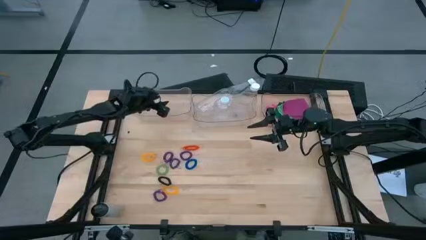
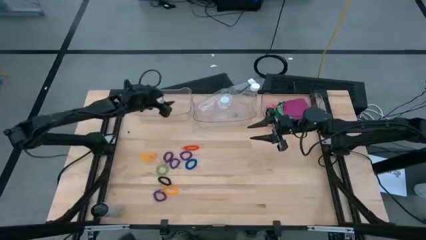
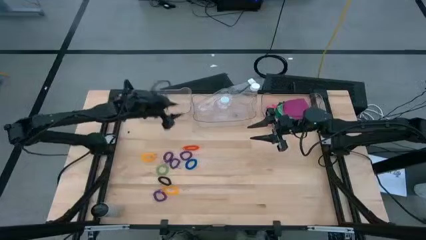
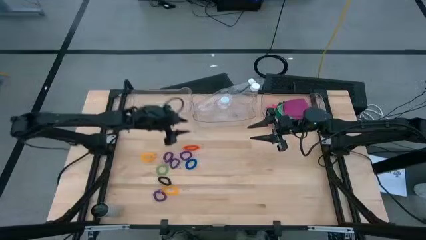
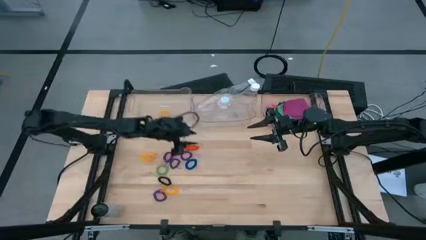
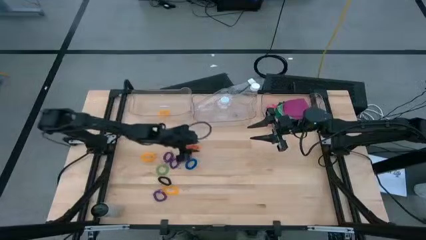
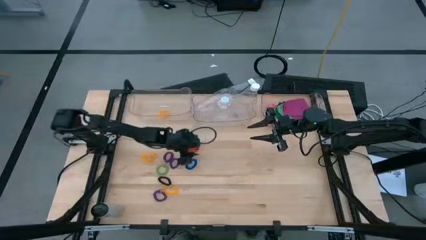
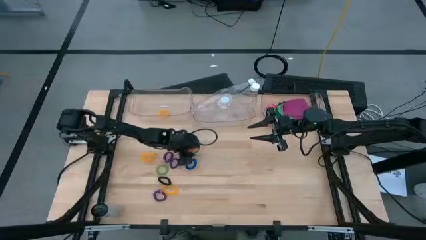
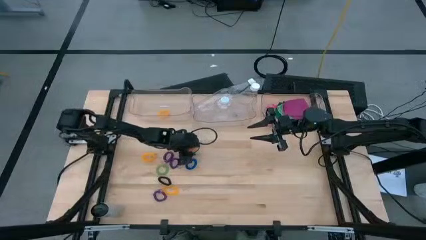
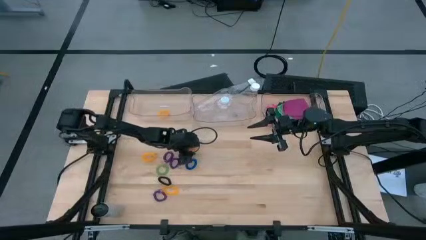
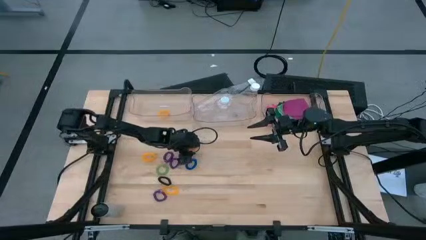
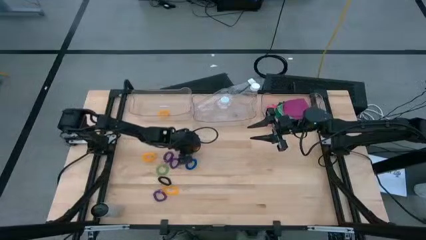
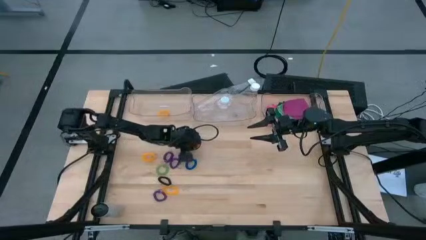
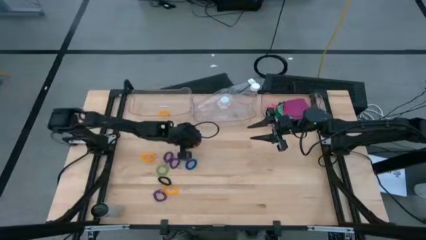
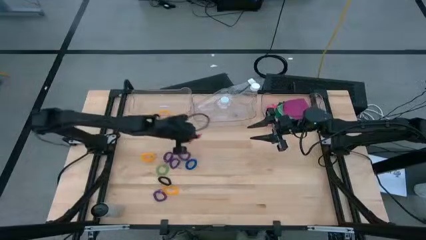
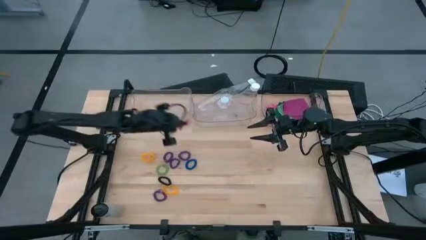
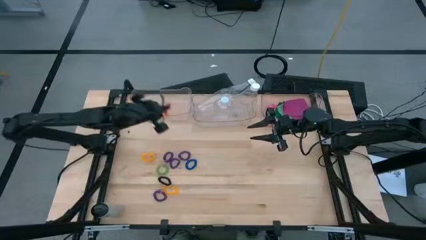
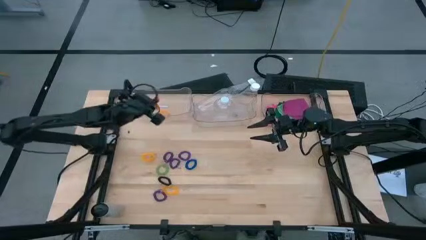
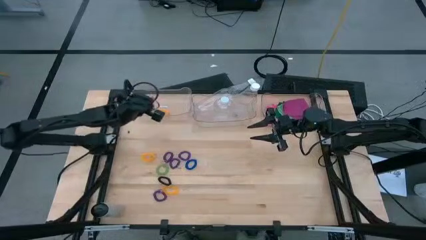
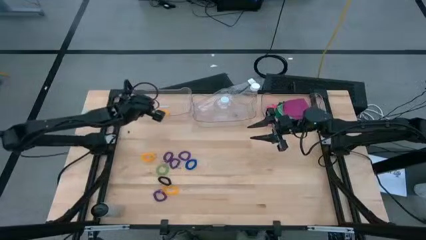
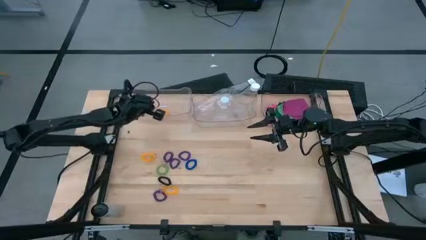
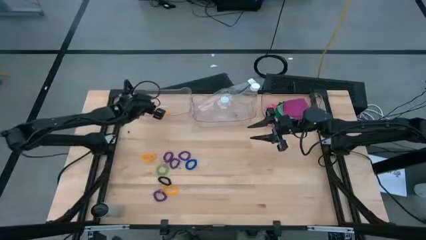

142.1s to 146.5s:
Task: Pick & Place Sports Items
Put the orange spring keychain into the left transparent bin

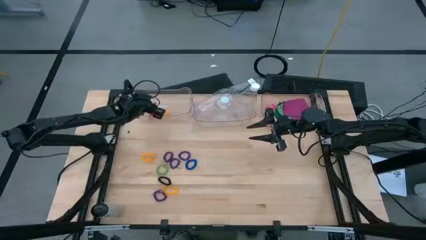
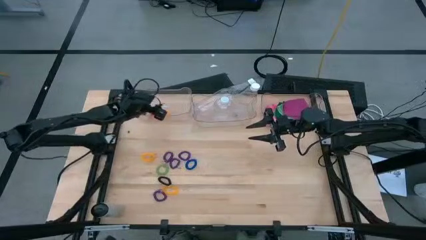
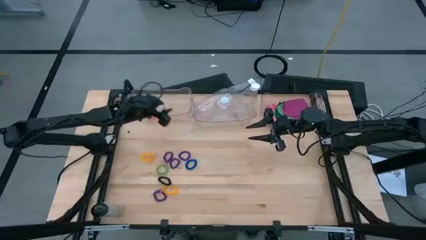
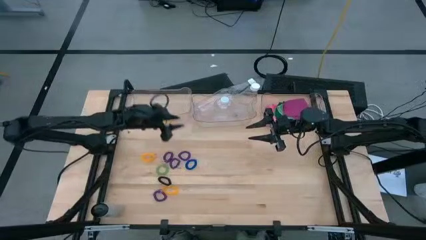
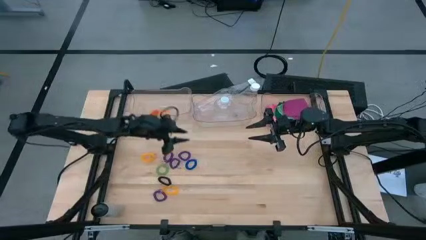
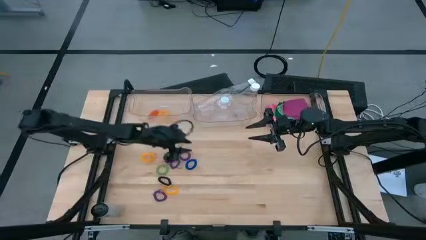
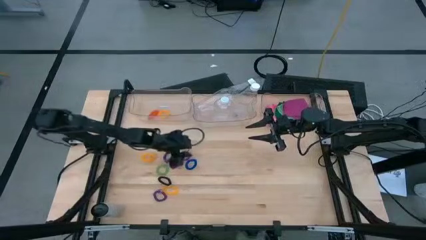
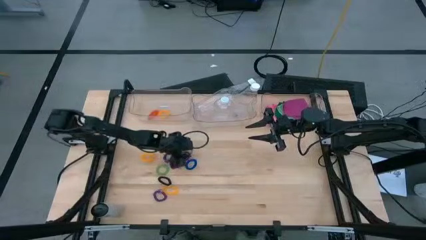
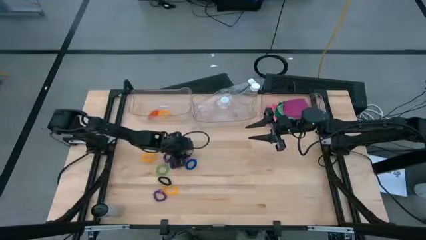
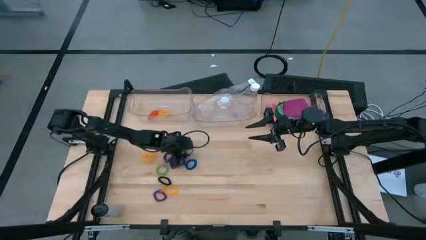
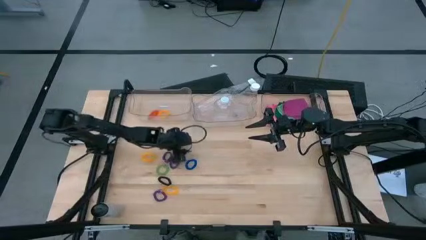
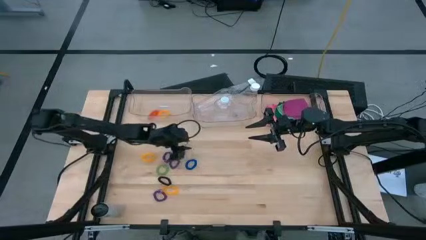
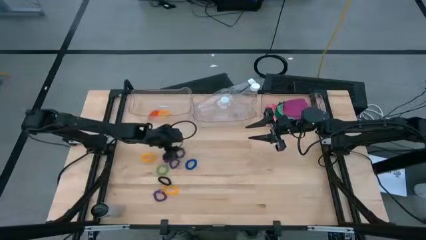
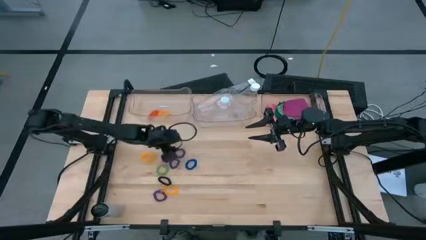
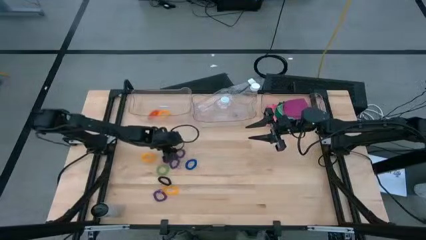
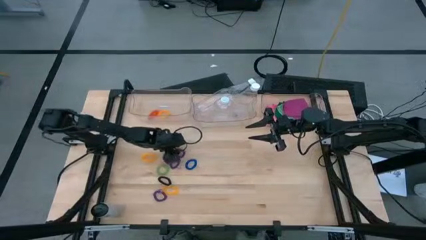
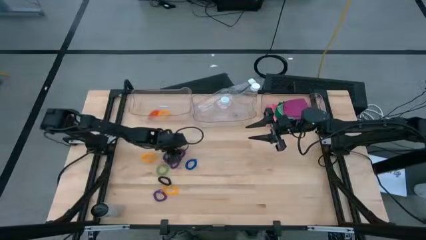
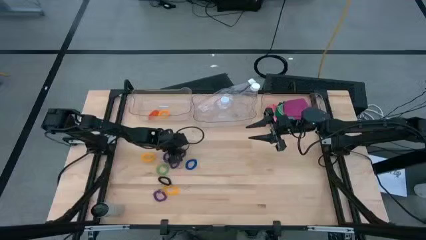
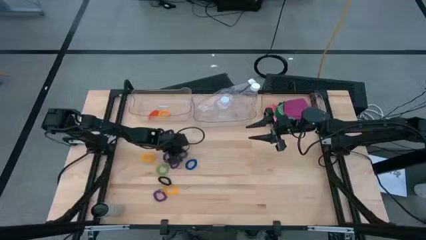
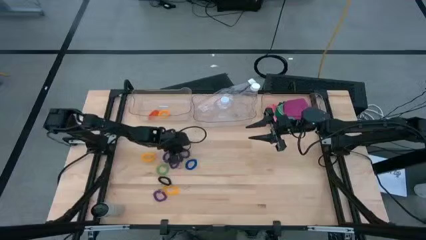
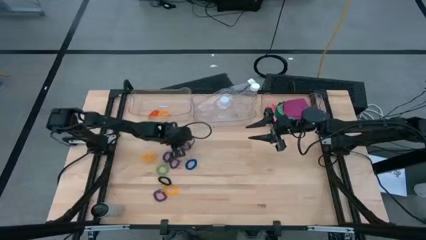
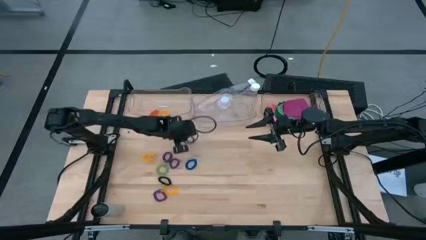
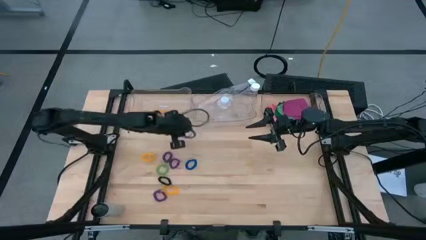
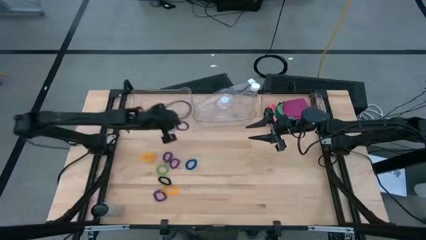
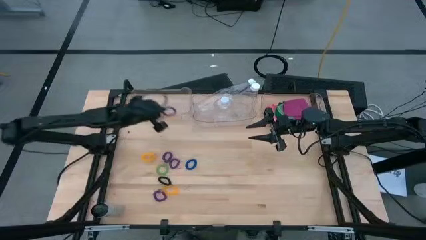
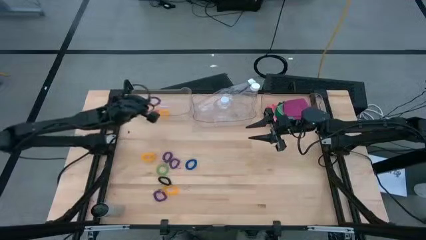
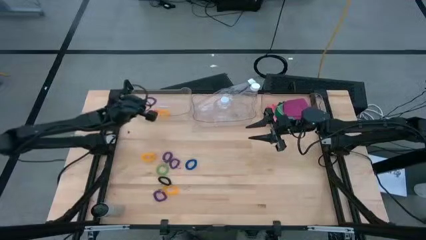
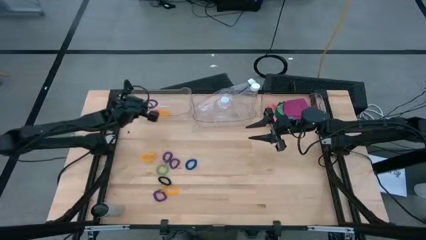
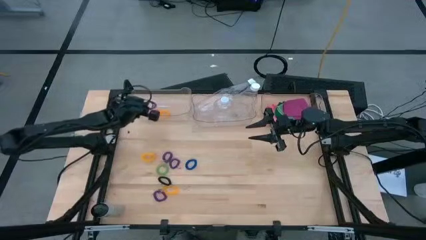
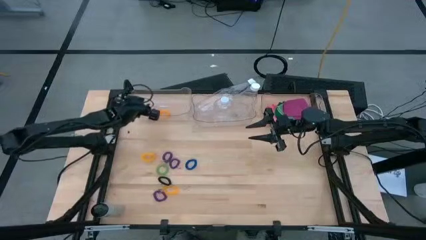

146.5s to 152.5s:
Put the top right violet spring keychain into the left transparent bin

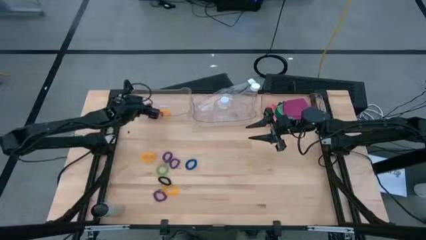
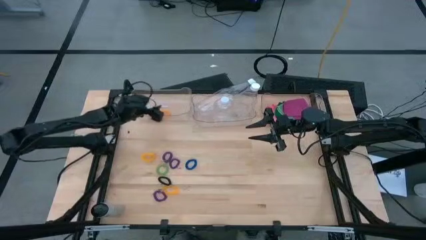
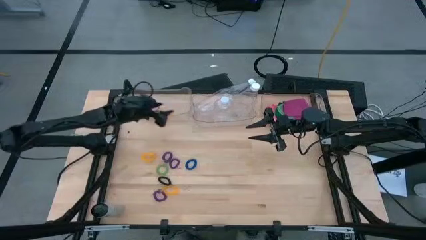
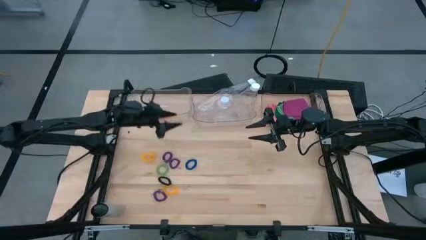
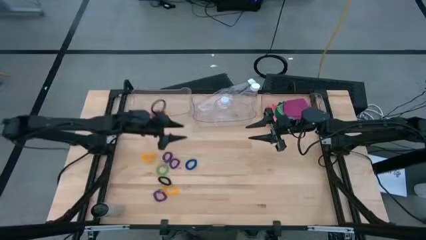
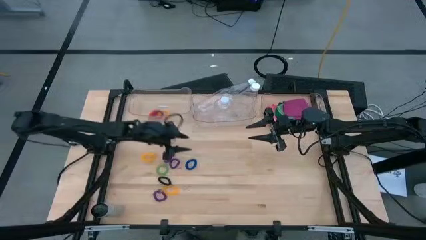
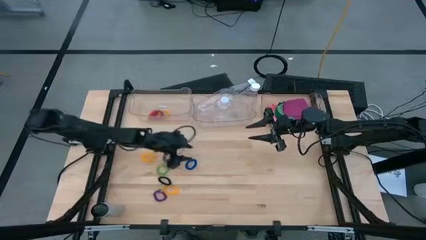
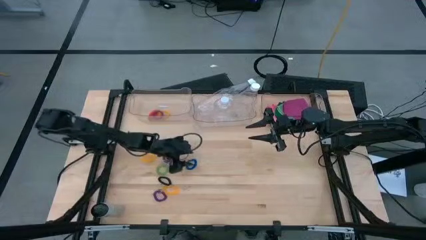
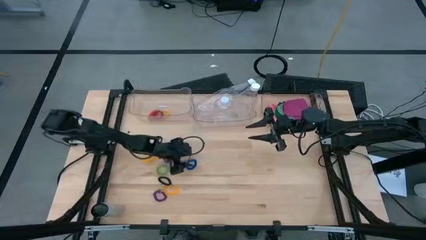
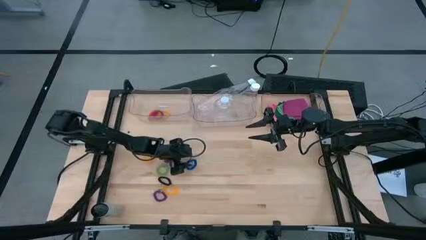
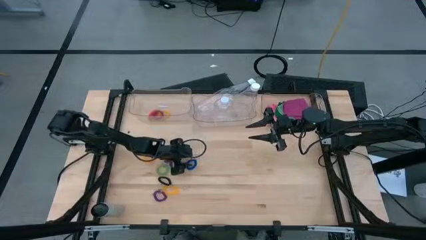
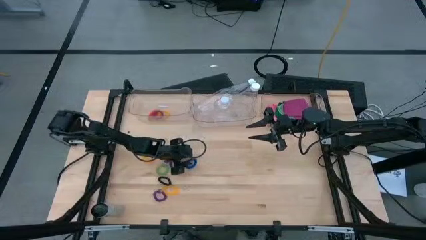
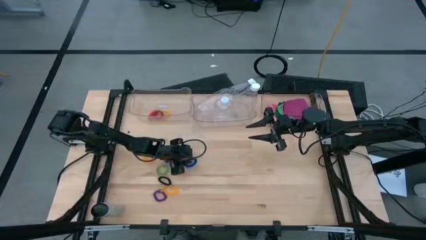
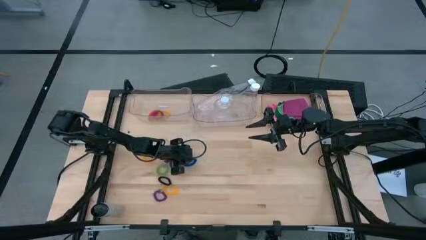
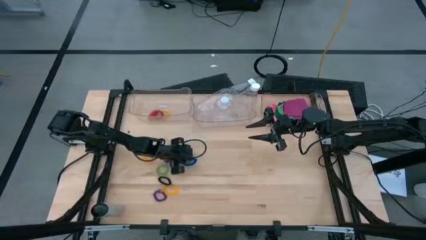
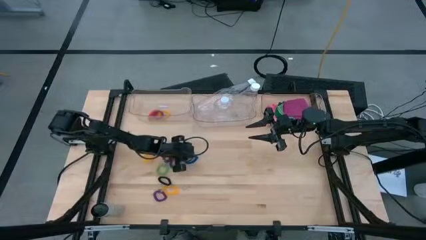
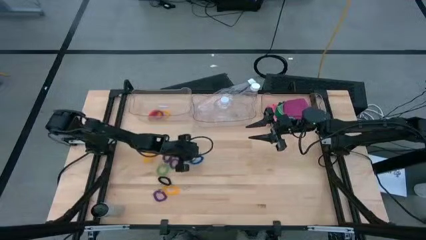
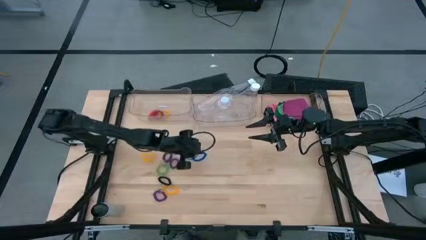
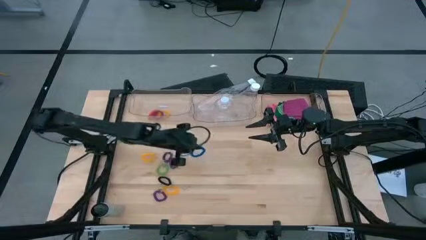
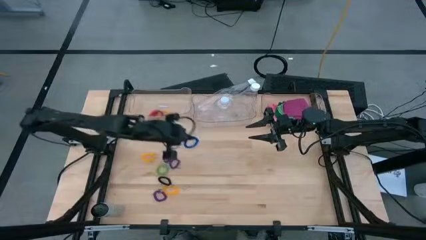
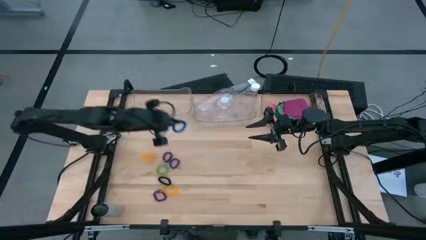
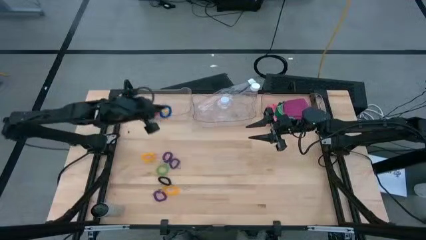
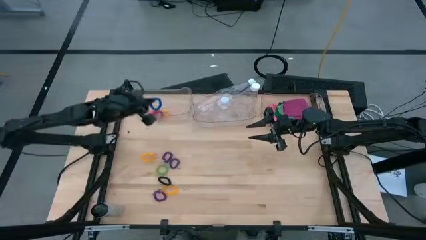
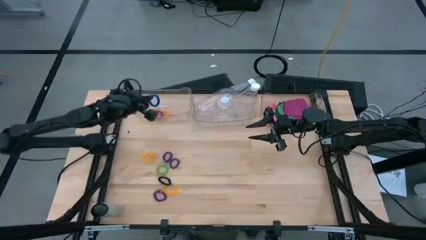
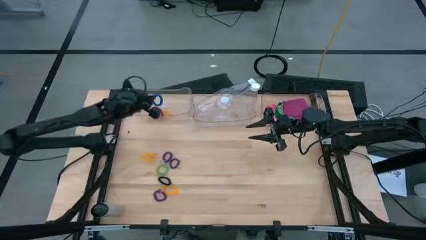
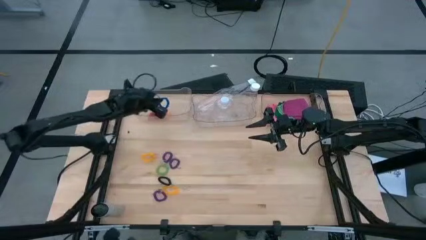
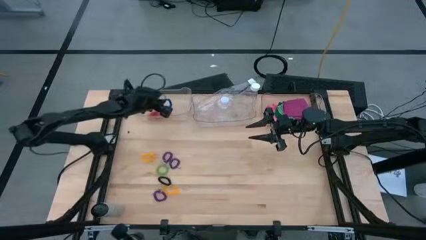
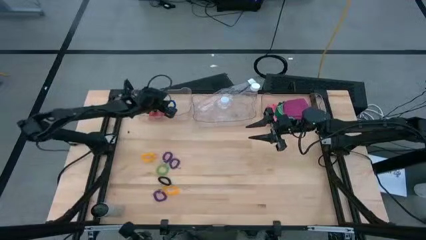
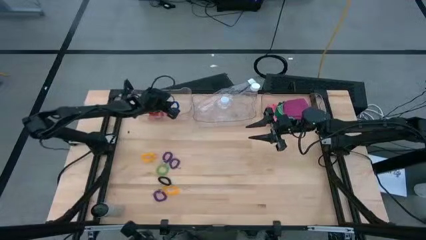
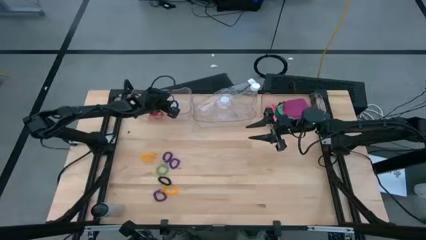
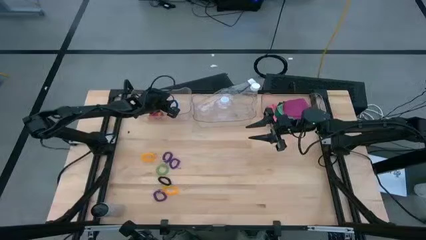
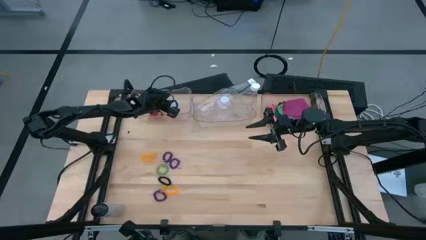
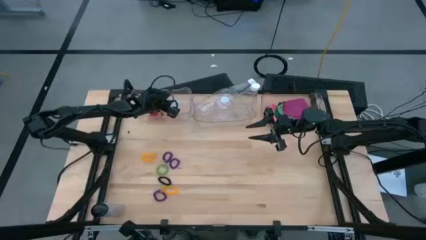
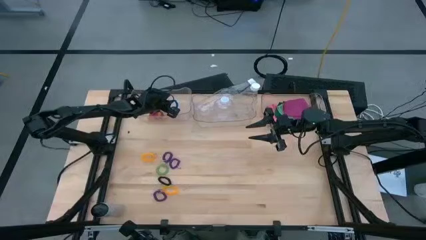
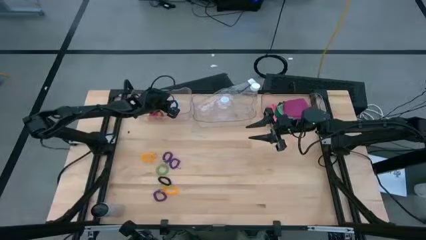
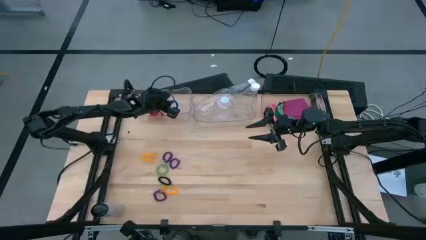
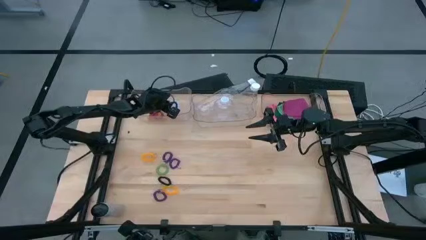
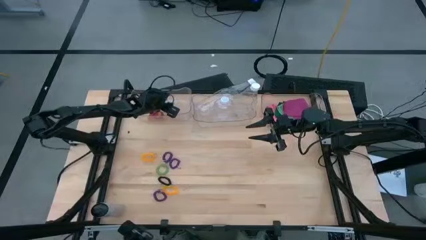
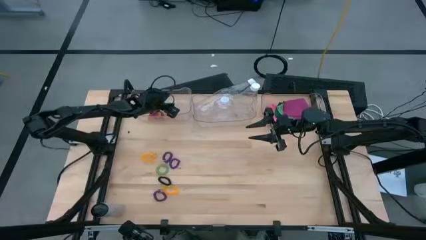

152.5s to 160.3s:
Put the blue spring keychain into the left transparent bin
